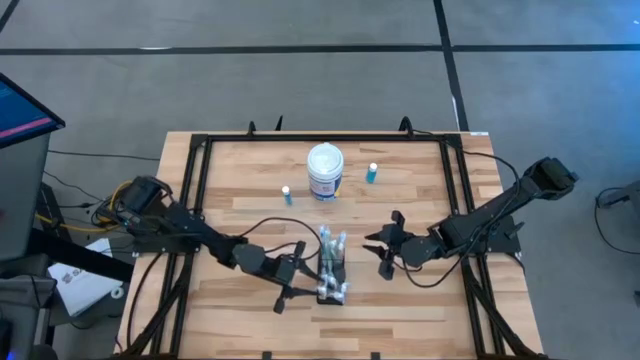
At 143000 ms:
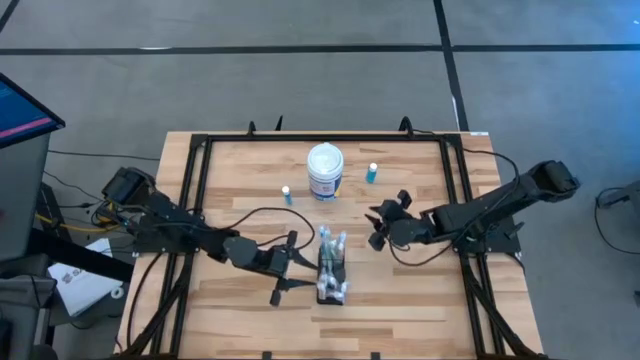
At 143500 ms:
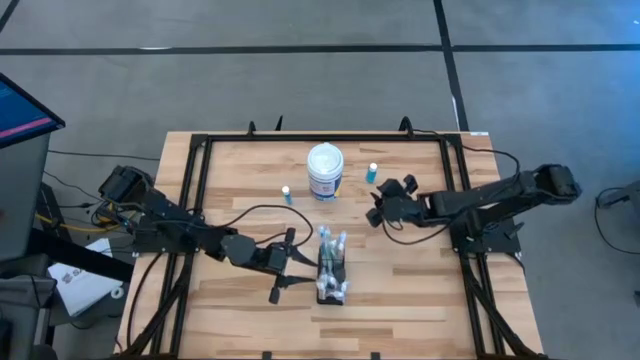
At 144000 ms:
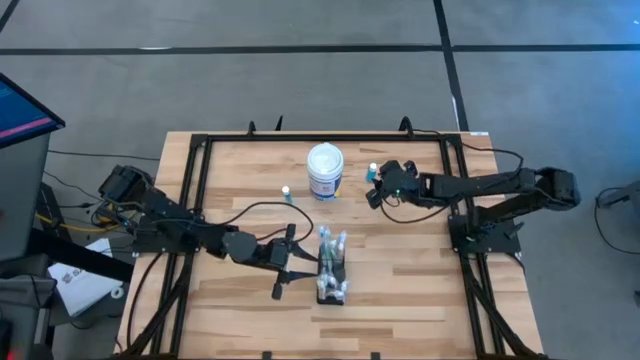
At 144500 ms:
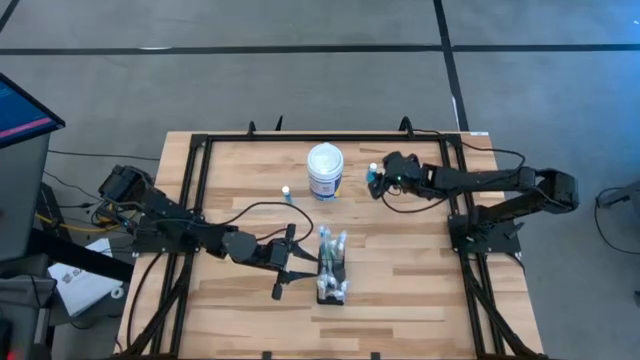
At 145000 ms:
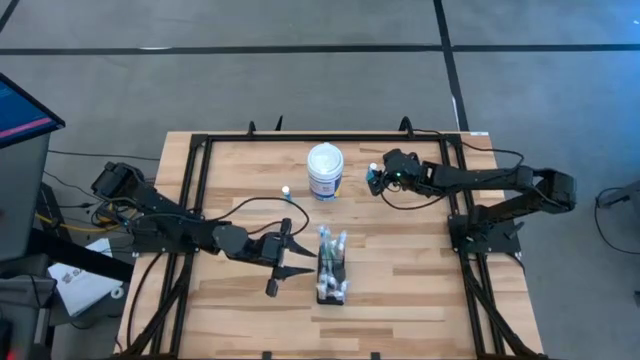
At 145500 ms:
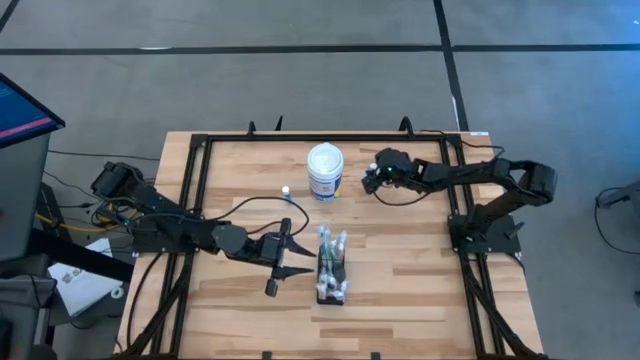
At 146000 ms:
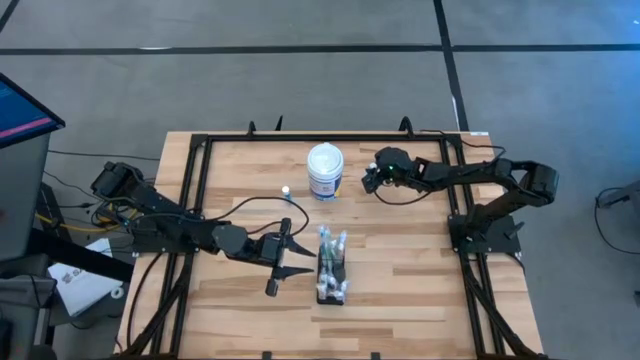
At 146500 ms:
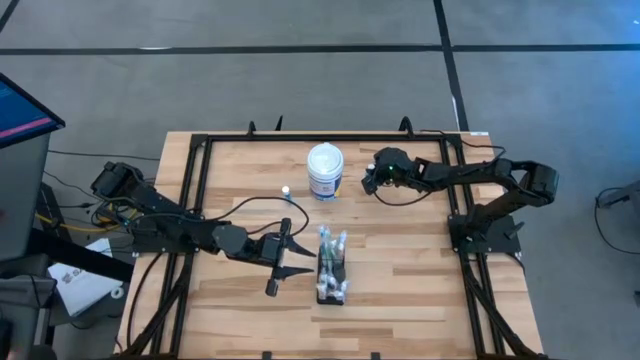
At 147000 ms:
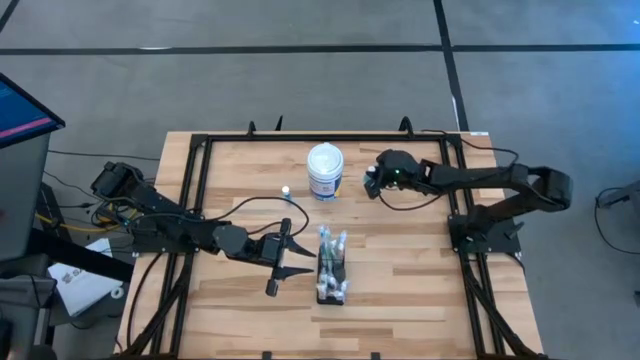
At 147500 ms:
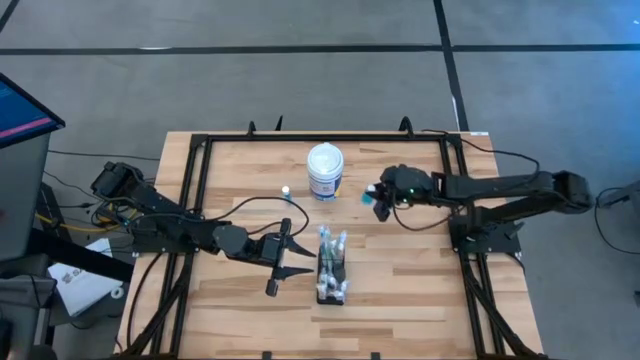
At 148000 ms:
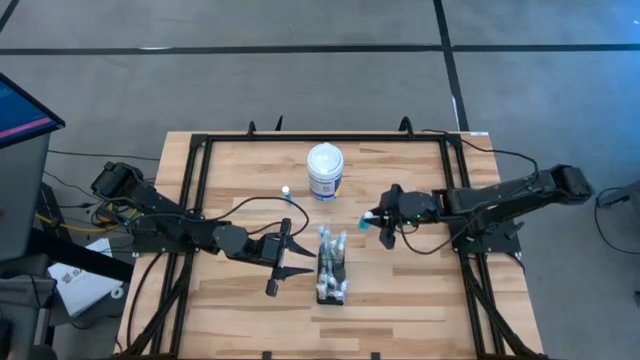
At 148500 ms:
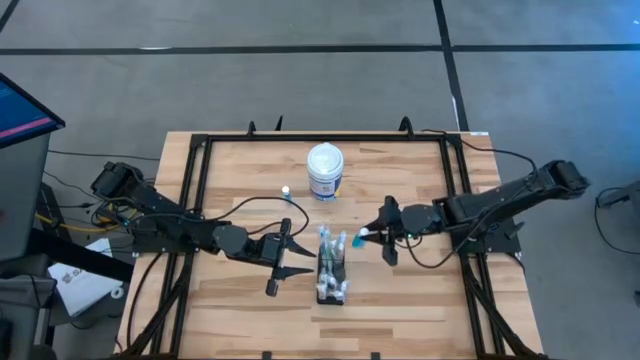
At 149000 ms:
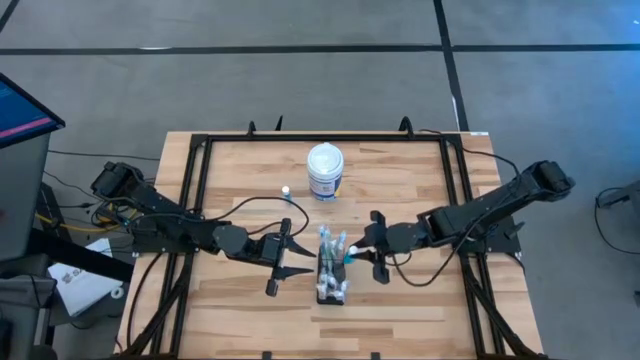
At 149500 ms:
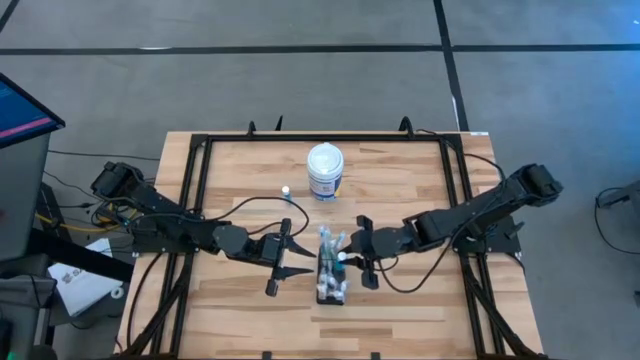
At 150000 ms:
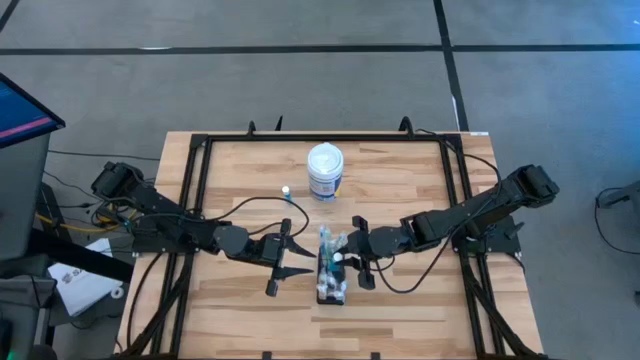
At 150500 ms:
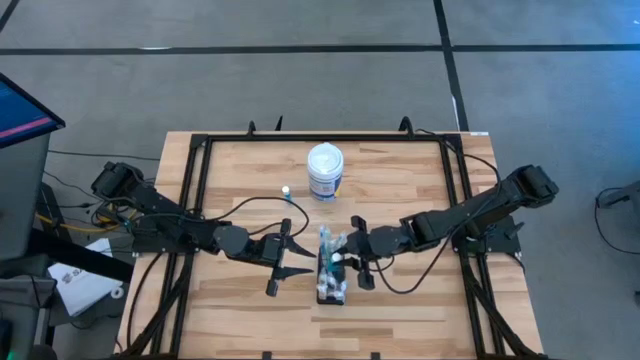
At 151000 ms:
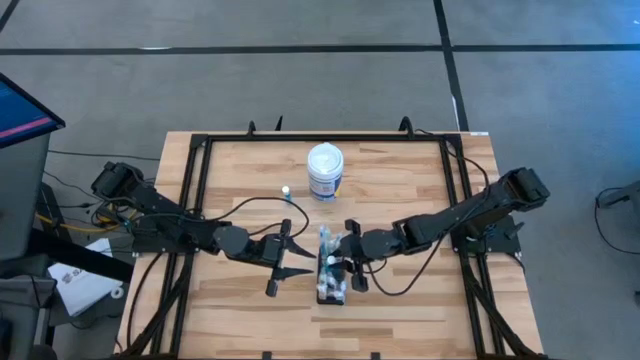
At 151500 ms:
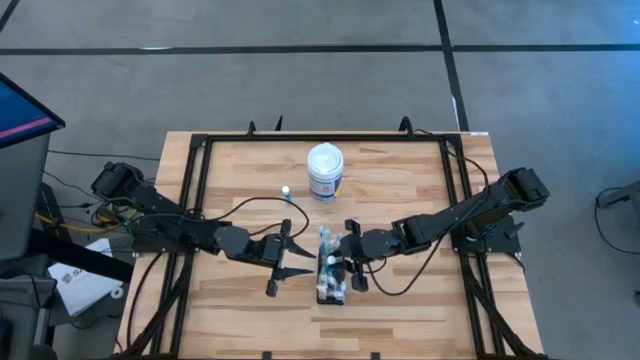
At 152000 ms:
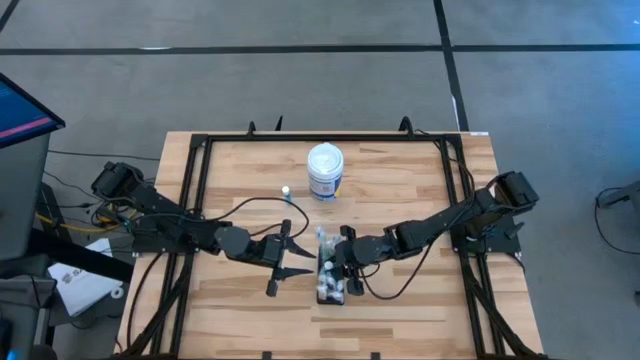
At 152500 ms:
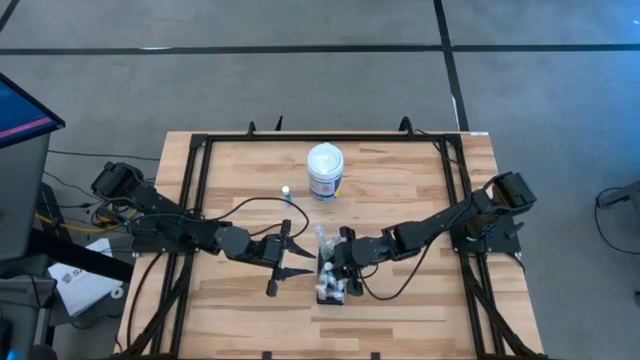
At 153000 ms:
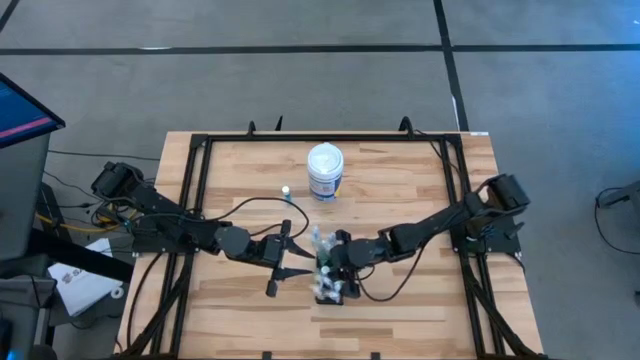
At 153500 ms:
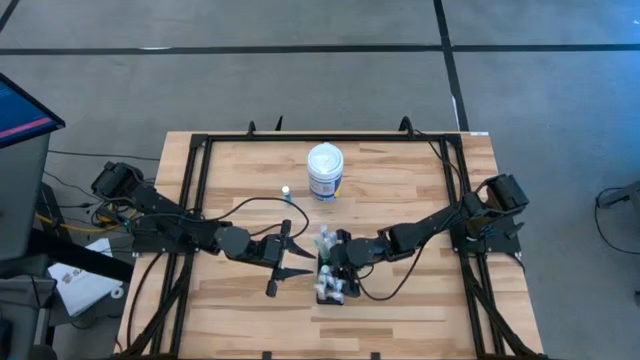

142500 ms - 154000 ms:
Task: Pick & Place toothbrushing station
Put the right blue mouthwash into the black mesh organizer

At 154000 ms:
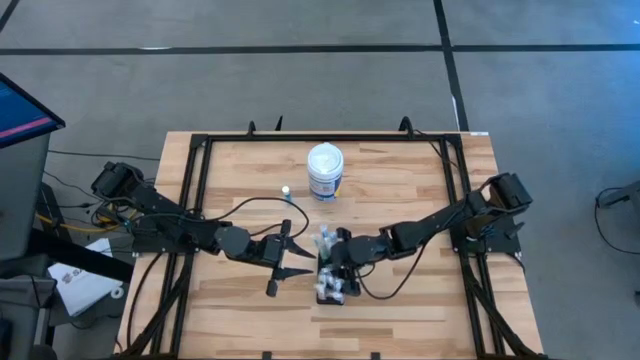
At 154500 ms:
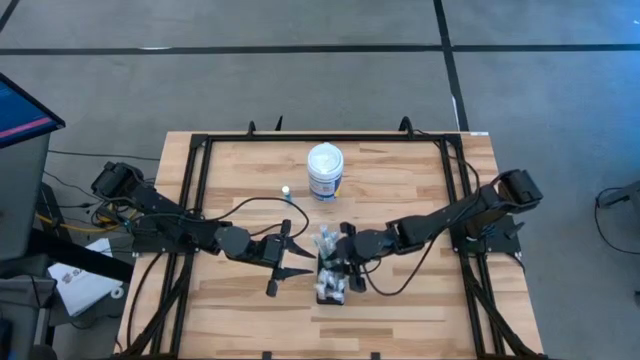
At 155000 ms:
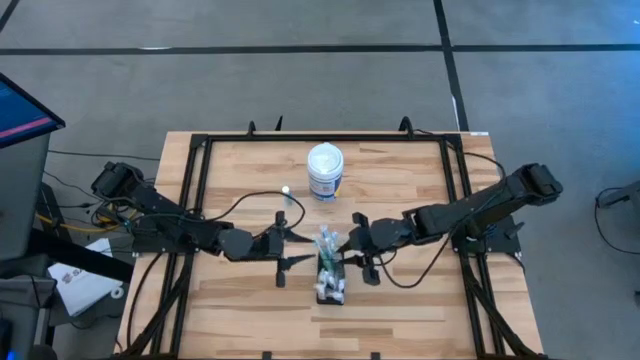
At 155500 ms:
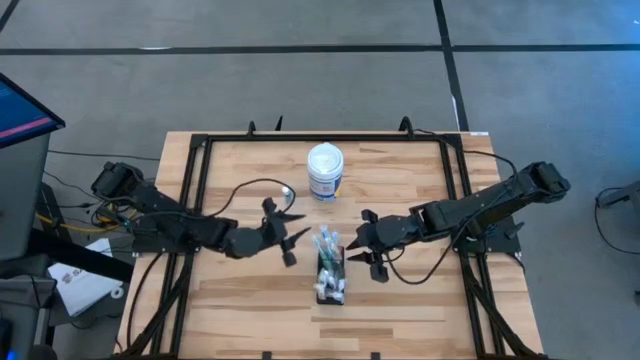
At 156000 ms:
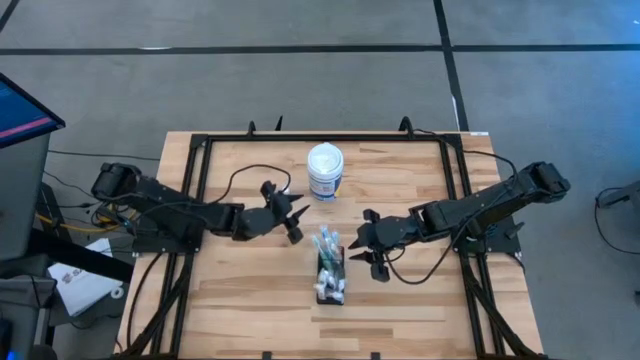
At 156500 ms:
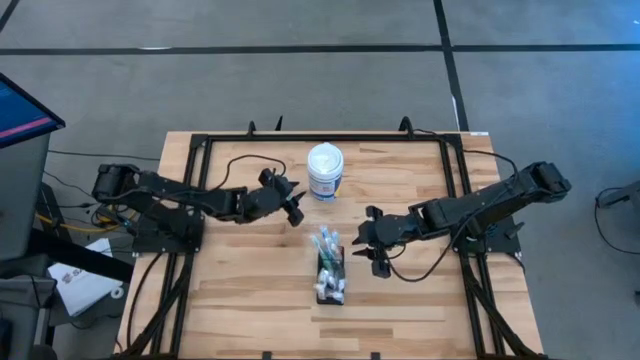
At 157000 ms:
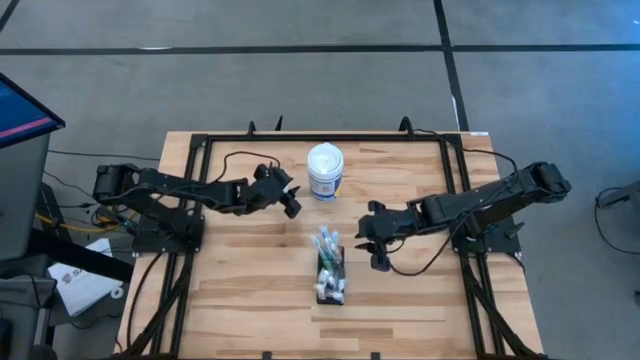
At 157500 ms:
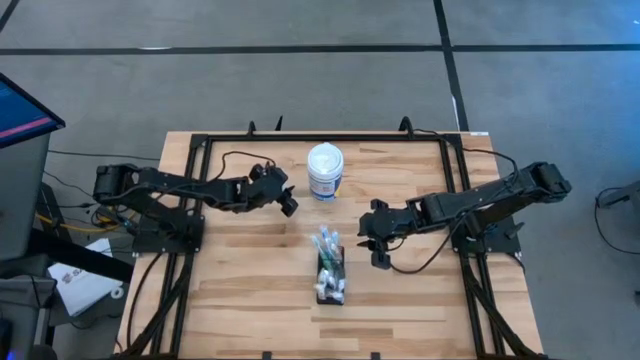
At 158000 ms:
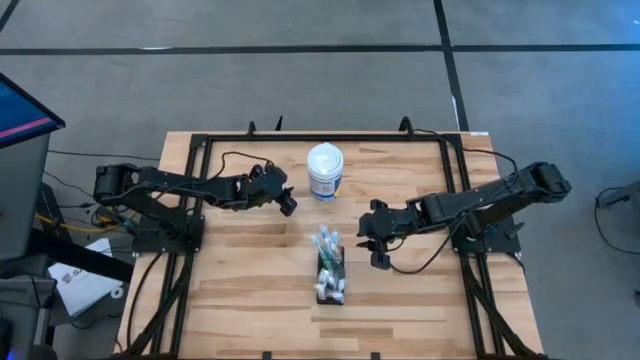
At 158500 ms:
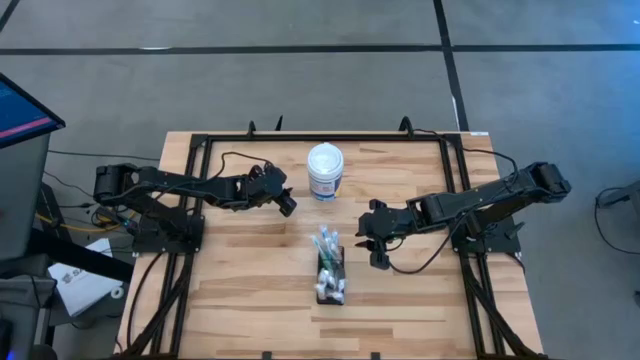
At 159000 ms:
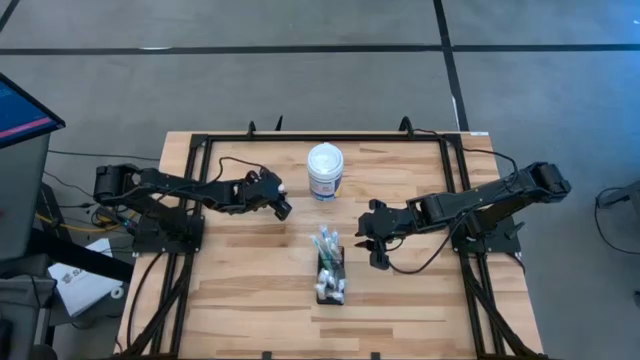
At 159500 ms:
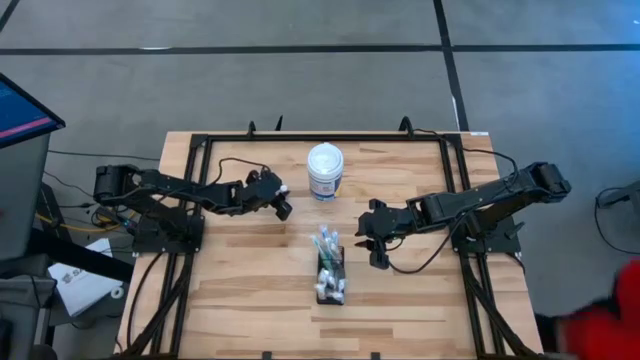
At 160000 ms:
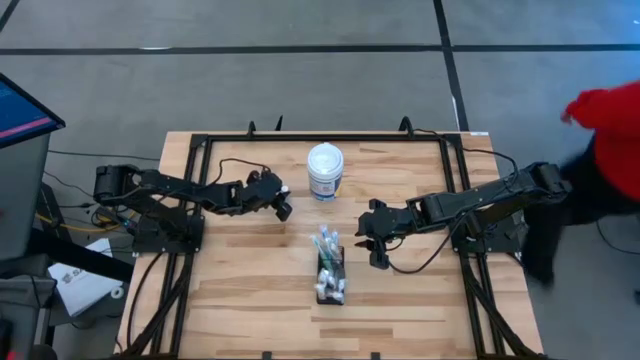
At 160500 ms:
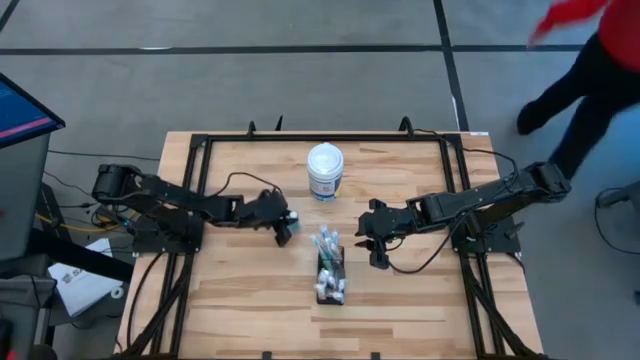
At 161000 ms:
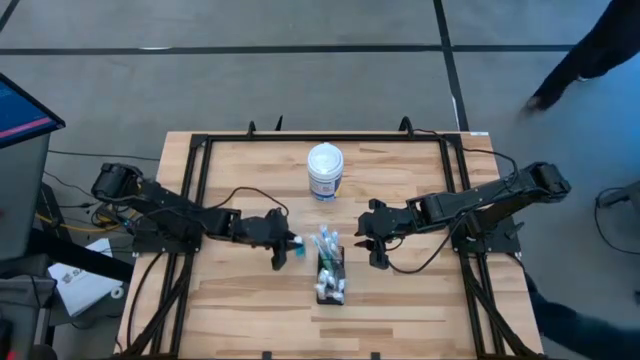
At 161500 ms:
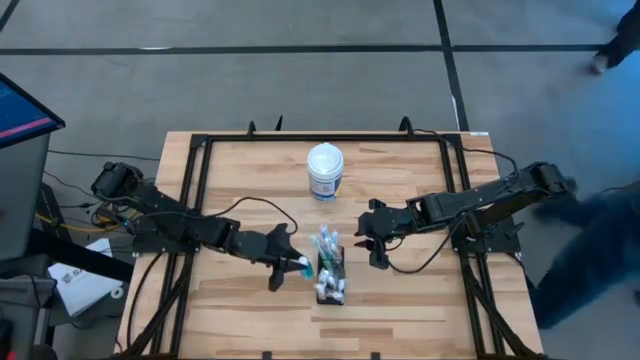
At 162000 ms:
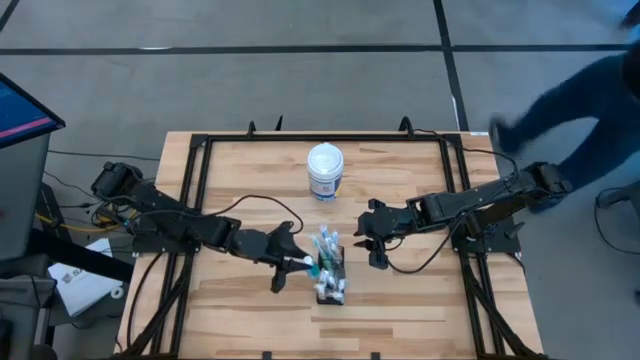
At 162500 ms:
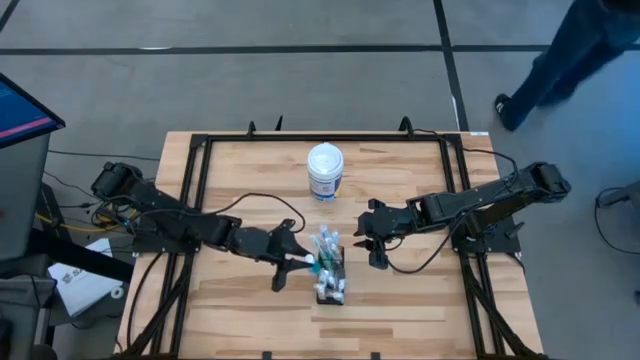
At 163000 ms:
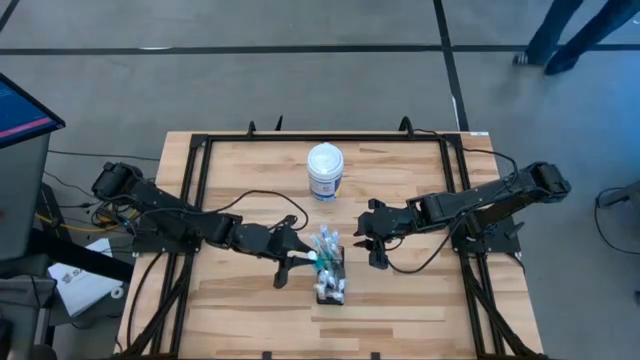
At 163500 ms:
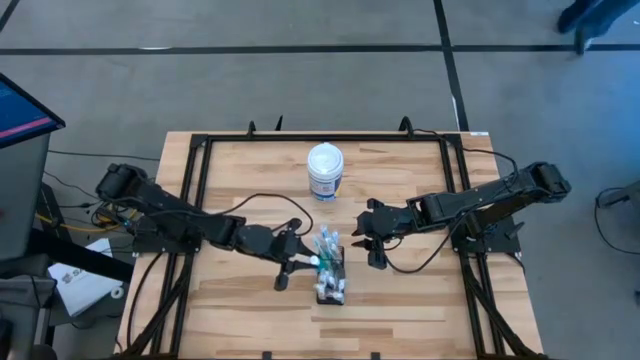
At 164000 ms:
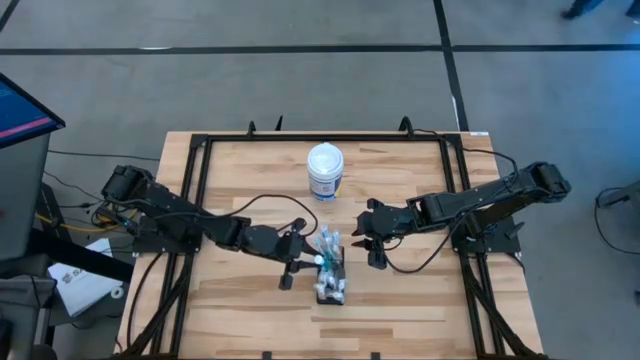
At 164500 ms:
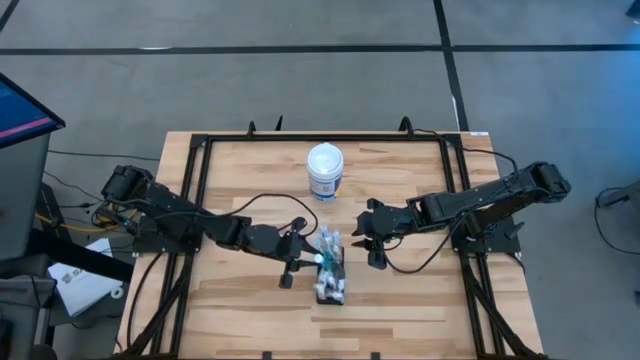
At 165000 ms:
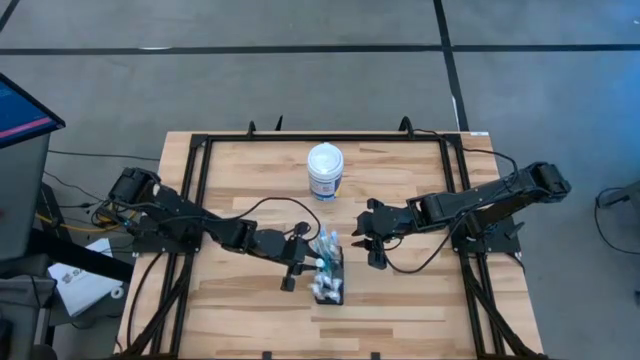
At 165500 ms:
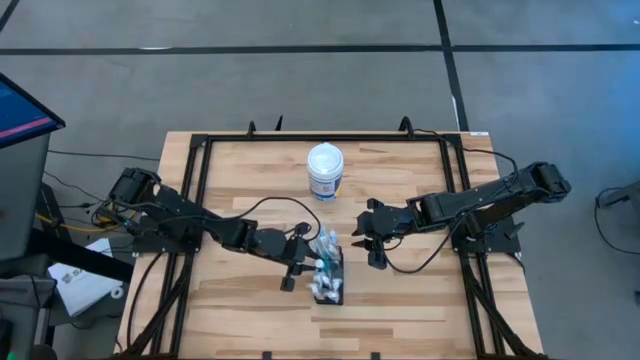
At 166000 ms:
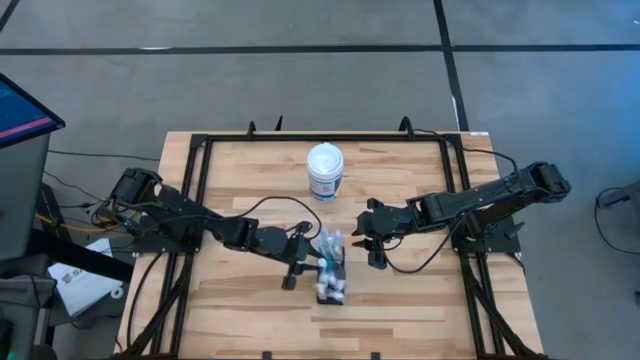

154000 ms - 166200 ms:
Put the blue mouthwash into the black mesh organizer
